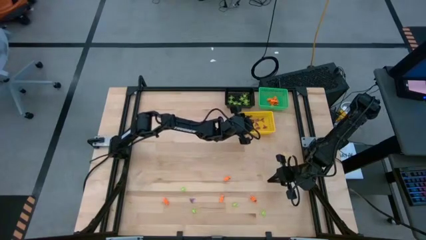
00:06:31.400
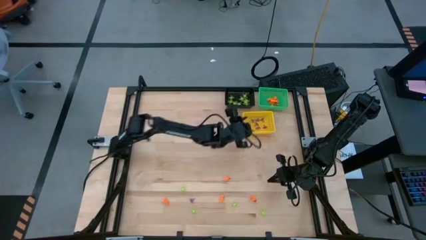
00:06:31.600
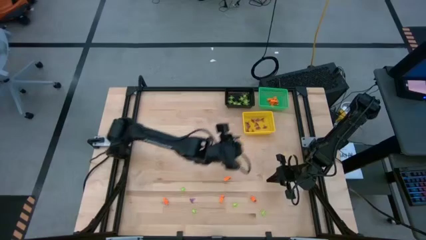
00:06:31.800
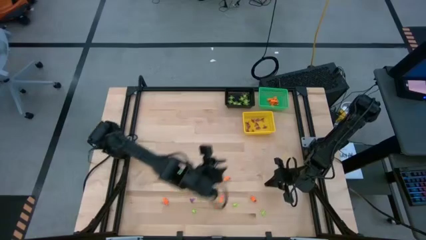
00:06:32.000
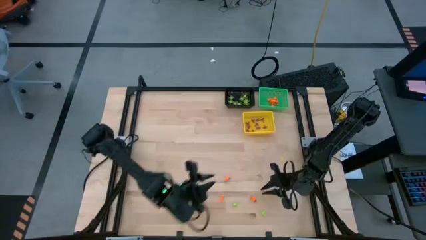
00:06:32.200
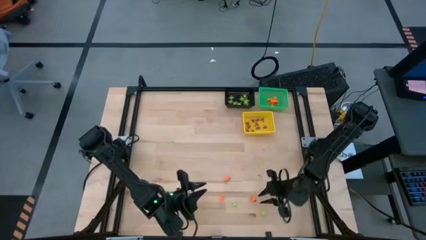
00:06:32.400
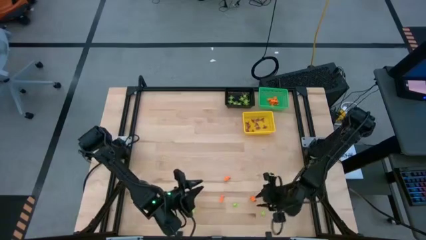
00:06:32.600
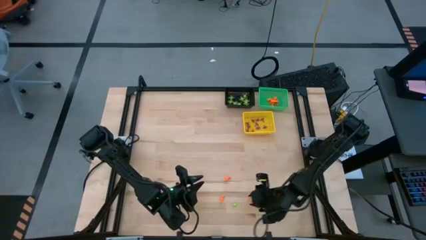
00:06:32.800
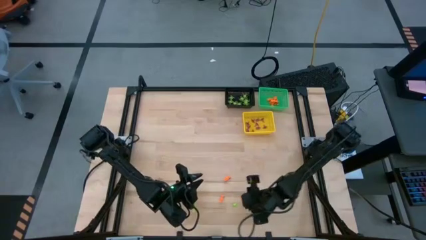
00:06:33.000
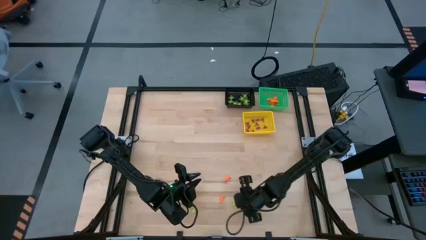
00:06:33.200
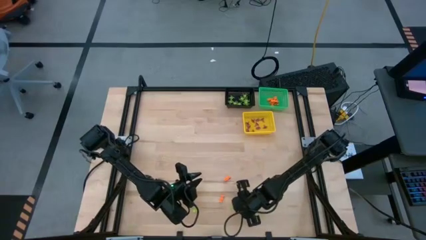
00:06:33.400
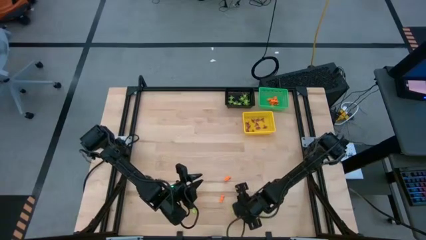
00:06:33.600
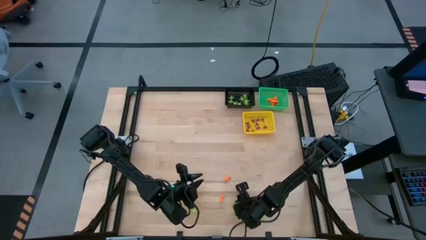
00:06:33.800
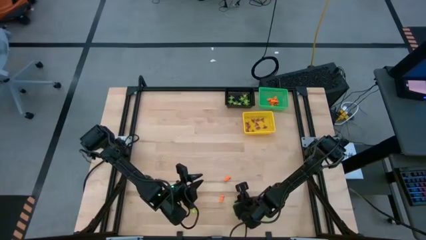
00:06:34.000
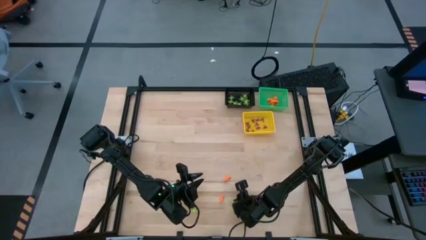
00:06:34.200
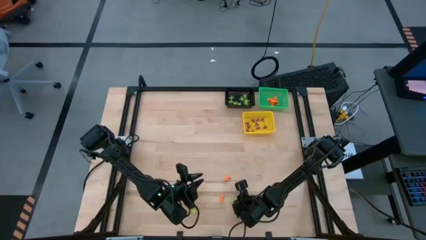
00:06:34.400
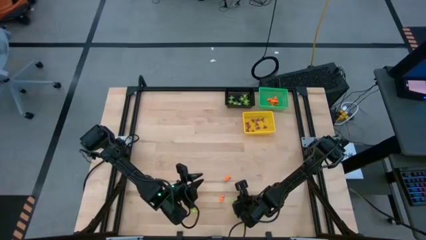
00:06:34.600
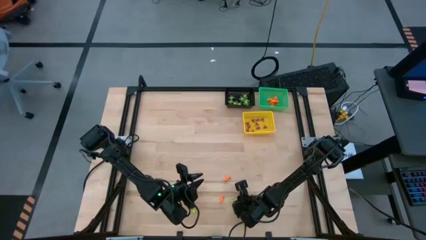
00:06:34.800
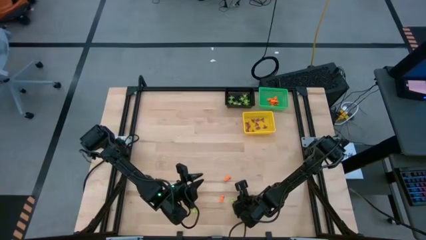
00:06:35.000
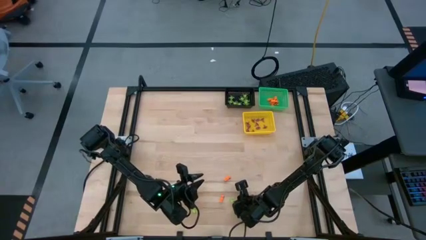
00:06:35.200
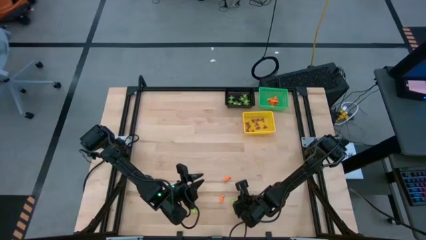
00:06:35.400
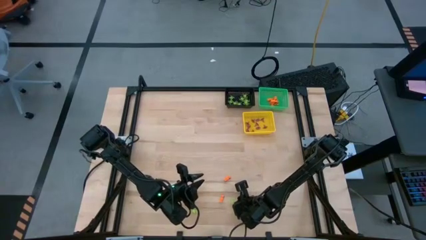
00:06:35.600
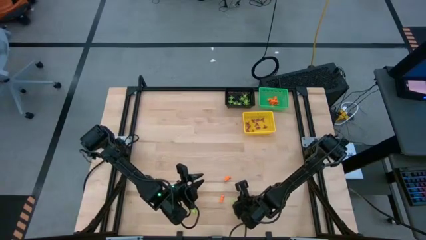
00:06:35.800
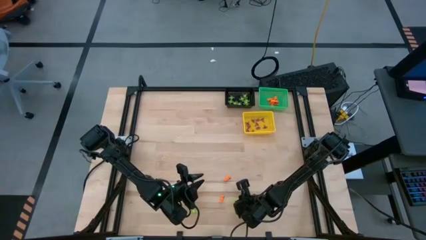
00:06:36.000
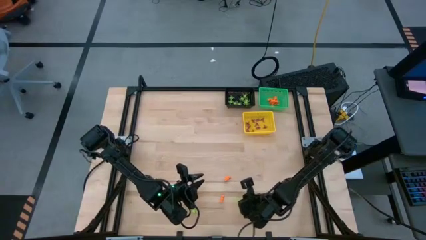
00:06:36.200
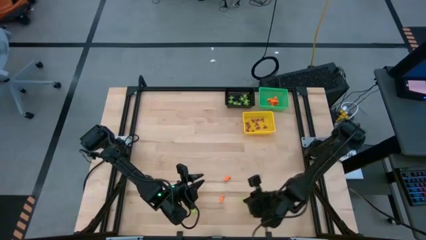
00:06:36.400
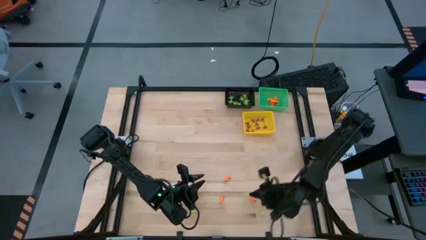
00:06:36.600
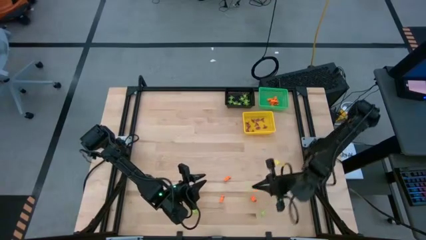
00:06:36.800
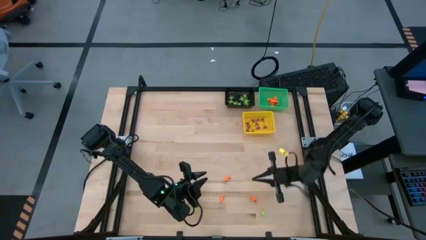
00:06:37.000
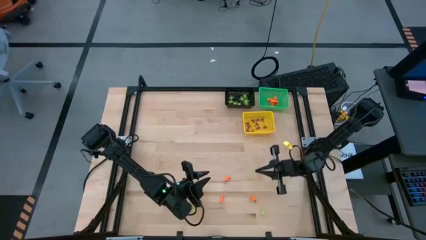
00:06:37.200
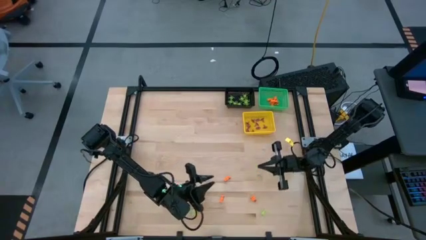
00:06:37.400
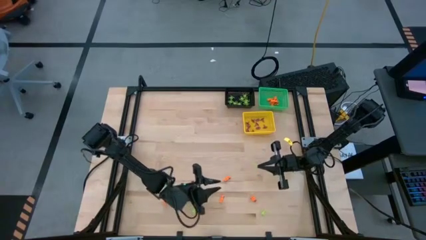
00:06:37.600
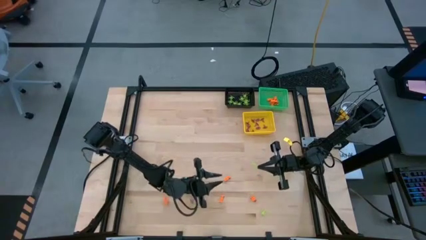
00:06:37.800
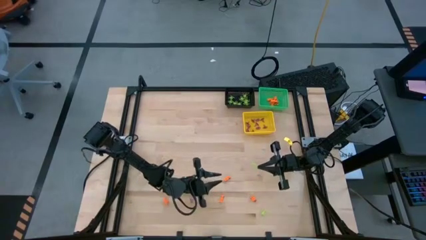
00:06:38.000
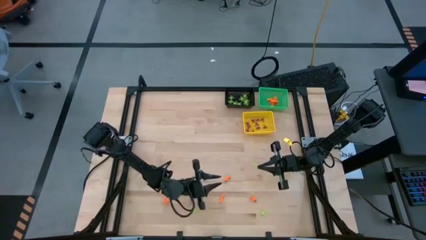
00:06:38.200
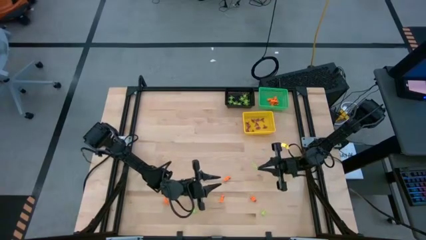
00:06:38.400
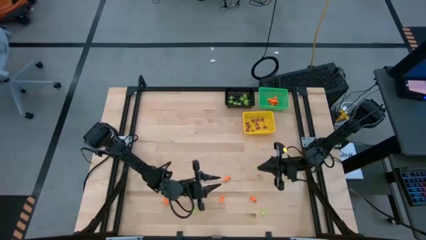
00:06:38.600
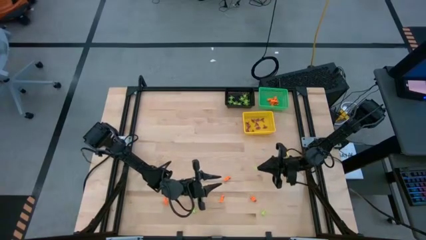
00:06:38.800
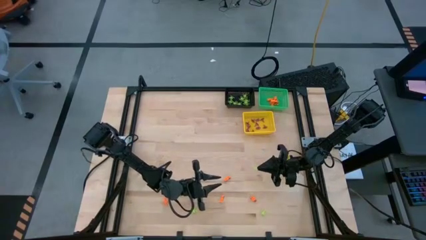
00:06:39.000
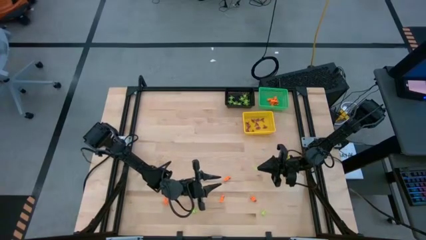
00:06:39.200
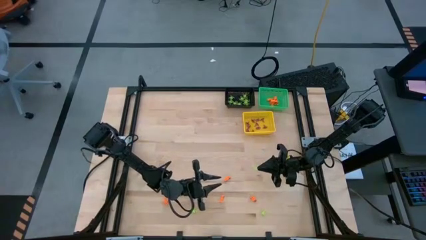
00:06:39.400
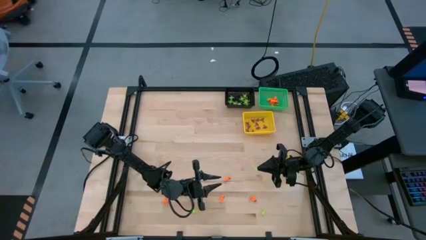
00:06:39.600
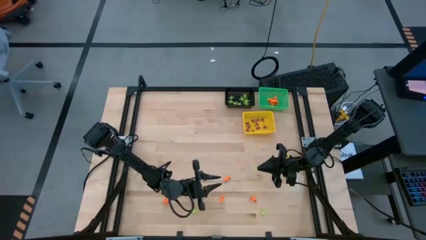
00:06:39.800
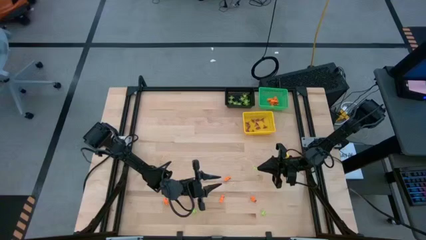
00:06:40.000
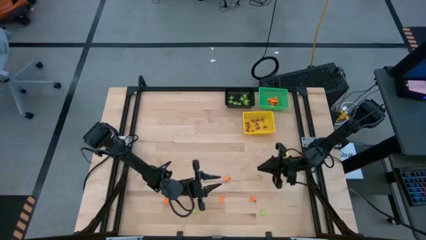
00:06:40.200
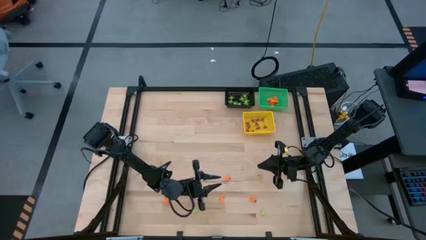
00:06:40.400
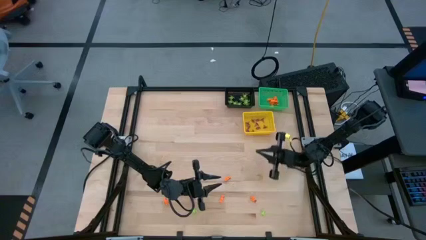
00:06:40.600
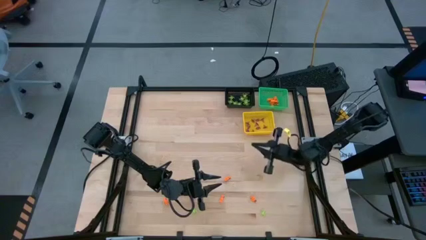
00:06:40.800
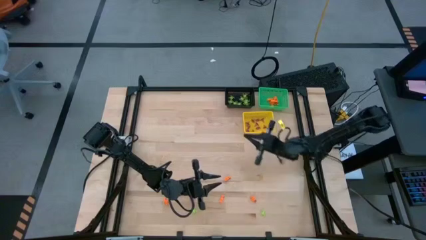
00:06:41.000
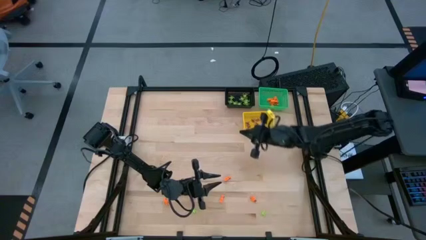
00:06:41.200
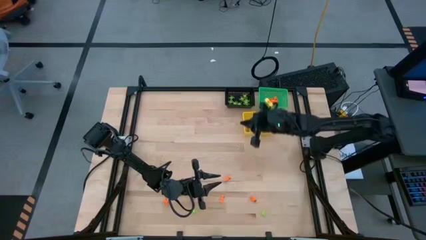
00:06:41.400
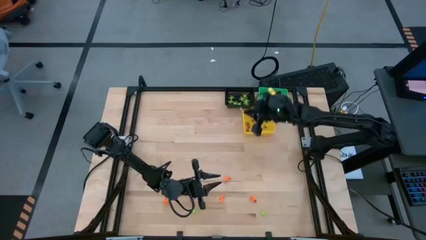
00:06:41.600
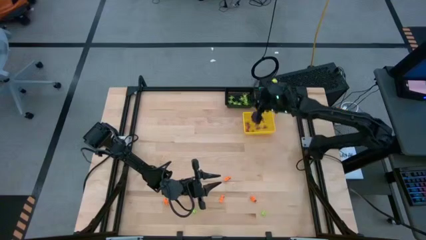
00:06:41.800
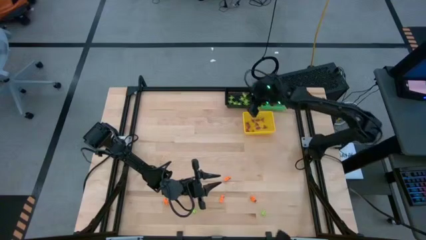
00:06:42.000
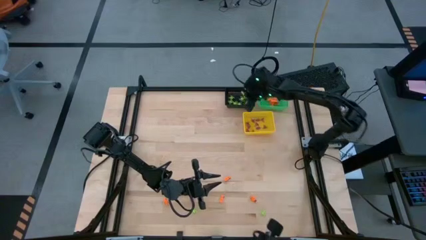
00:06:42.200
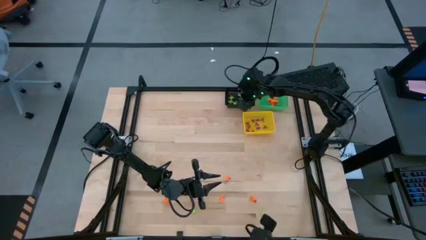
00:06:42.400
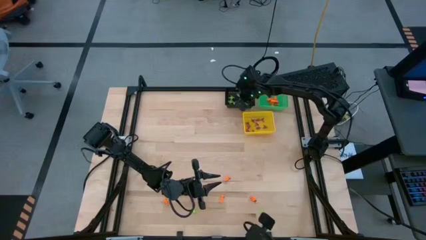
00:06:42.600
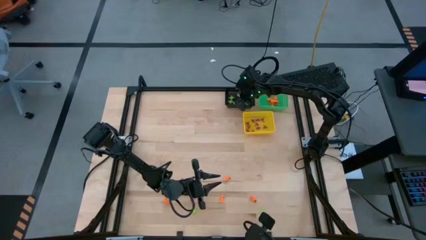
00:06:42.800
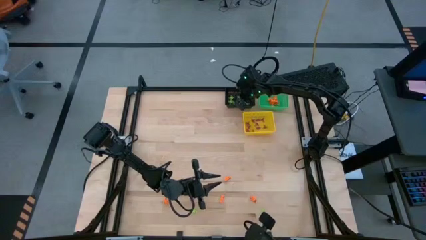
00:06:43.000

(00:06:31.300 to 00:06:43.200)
Task: Sort Halloween decoration
Put the green spider toy into the black basket

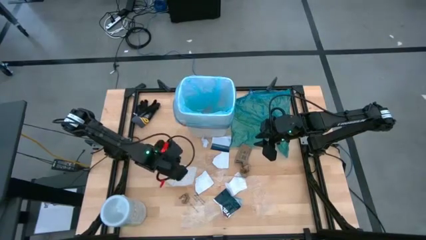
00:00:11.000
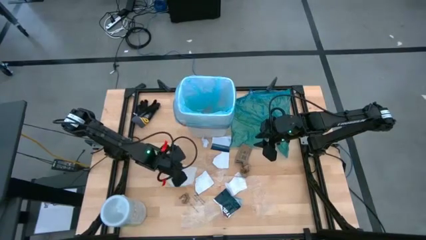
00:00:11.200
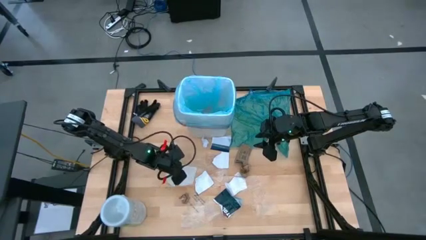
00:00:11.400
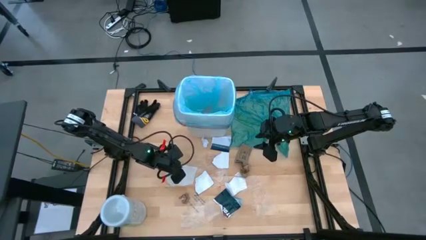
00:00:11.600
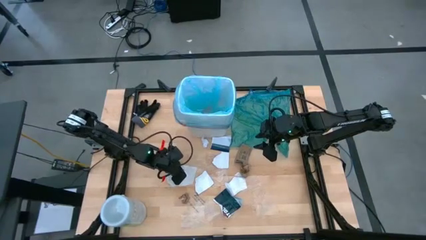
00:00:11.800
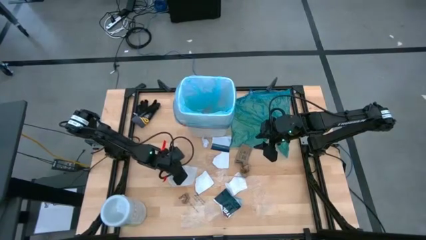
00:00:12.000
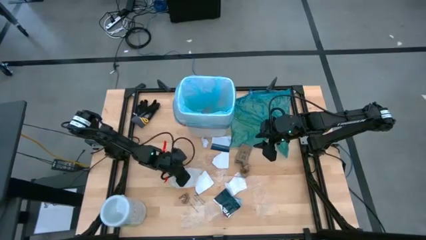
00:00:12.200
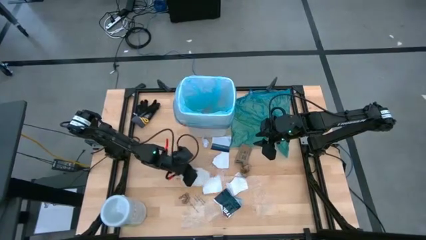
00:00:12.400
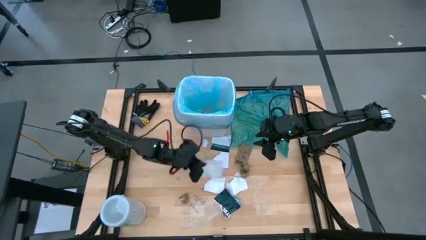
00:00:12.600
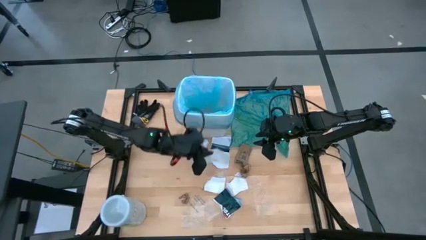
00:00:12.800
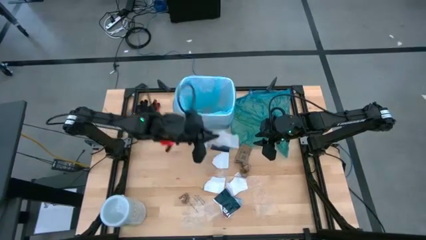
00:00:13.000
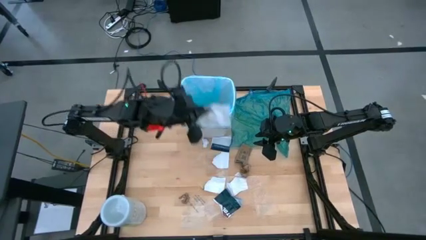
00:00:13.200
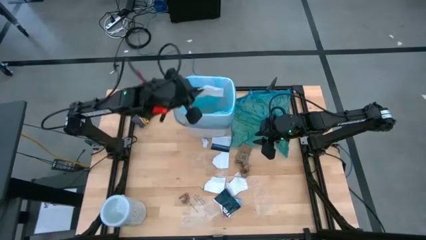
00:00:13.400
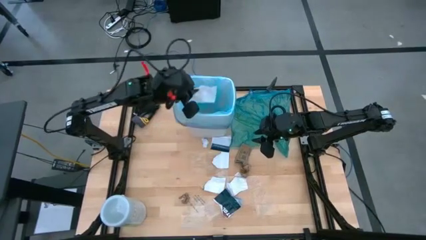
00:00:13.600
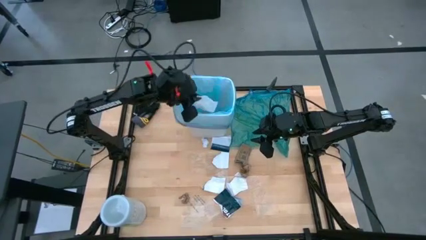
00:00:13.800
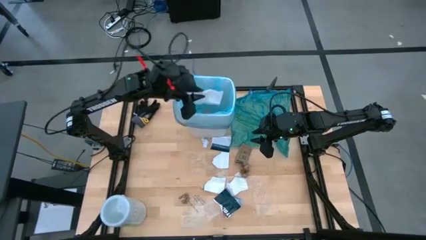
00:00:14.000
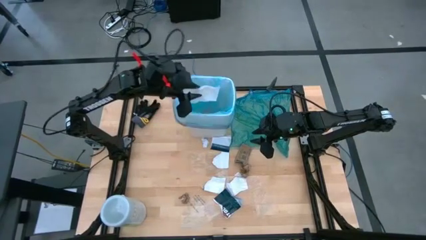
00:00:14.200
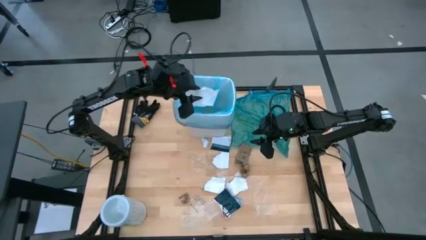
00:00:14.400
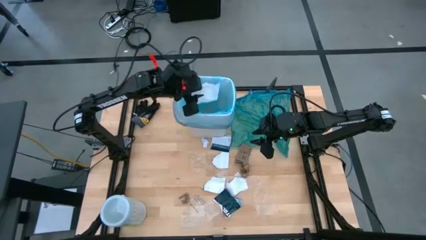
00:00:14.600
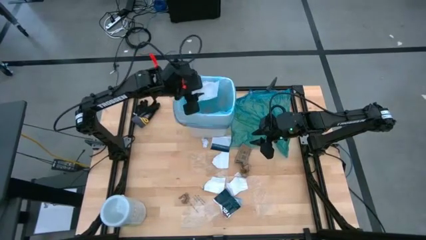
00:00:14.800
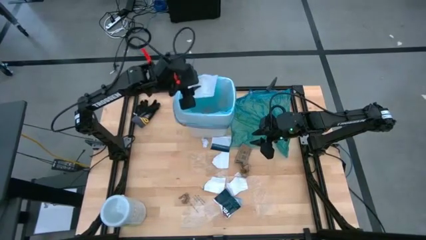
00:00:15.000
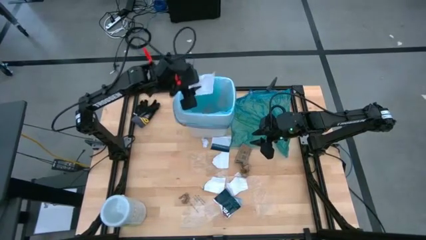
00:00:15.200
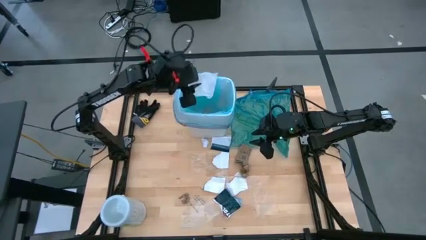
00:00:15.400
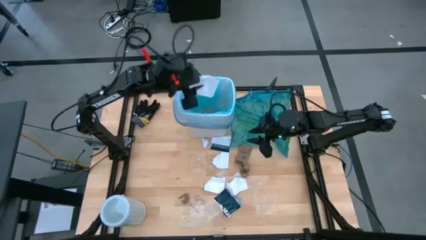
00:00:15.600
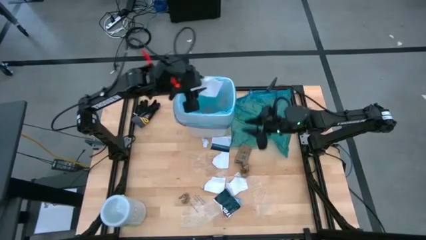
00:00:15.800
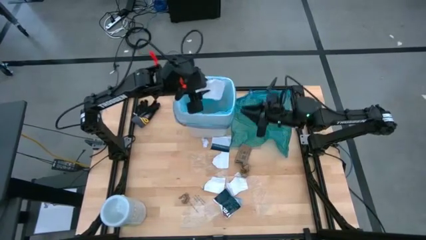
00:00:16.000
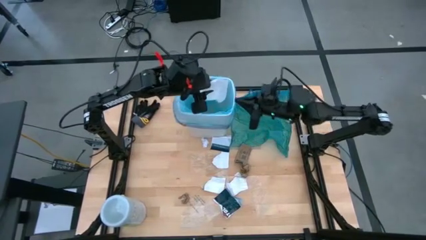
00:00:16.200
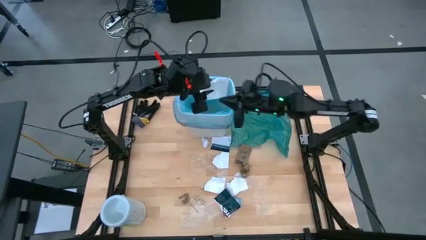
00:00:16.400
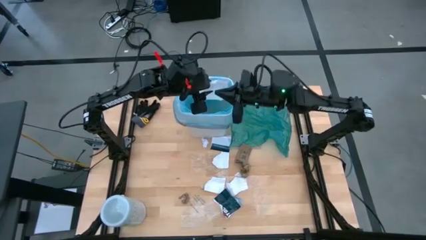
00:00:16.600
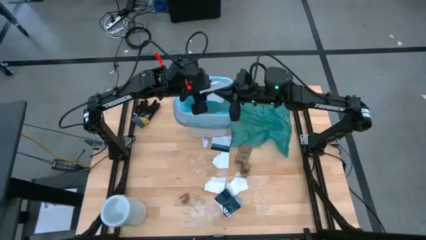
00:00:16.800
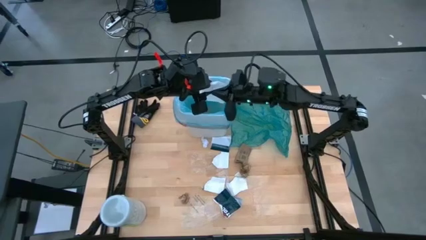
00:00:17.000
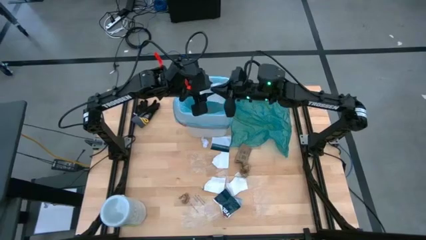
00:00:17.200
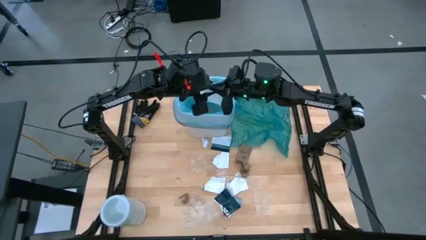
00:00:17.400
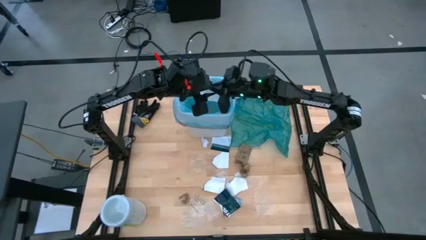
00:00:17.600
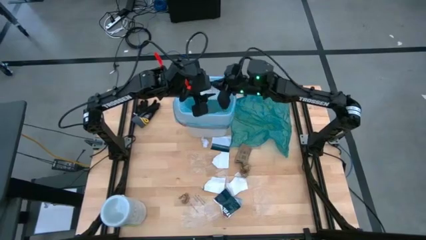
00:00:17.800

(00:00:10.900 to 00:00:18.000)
Task: place trash/remove bag and relplace
Put the white napkin into the trash bin
